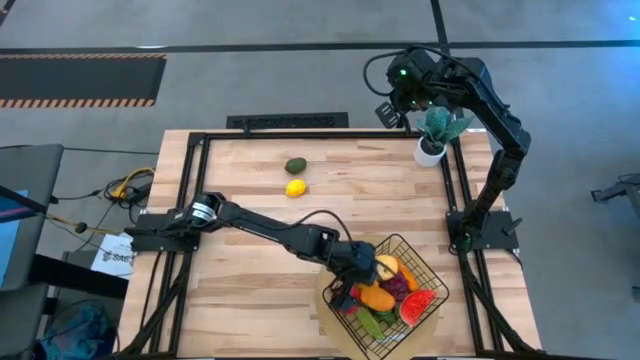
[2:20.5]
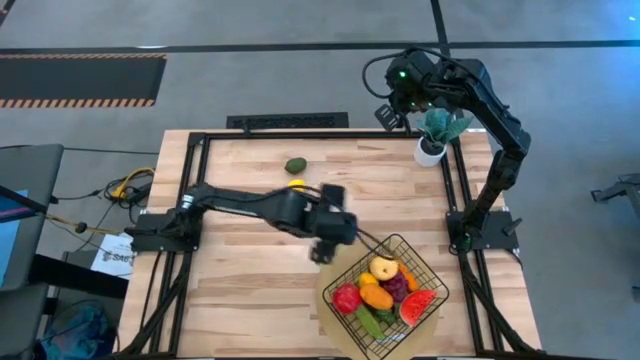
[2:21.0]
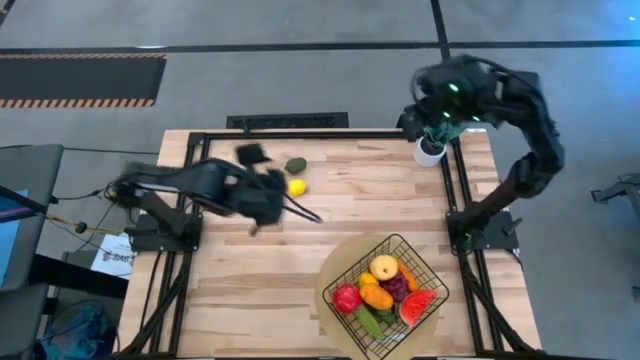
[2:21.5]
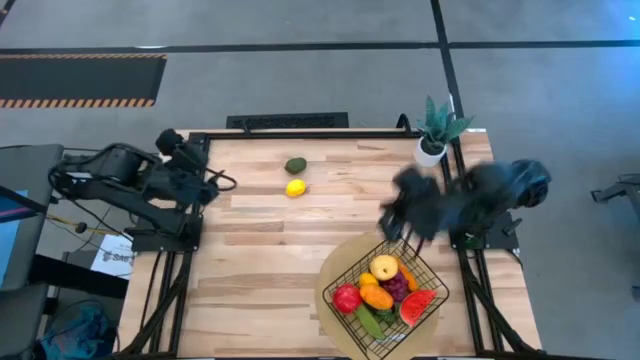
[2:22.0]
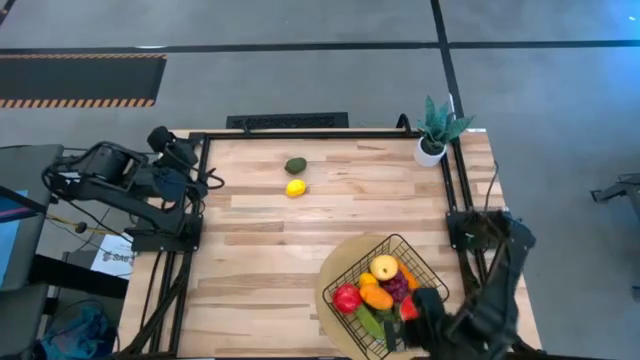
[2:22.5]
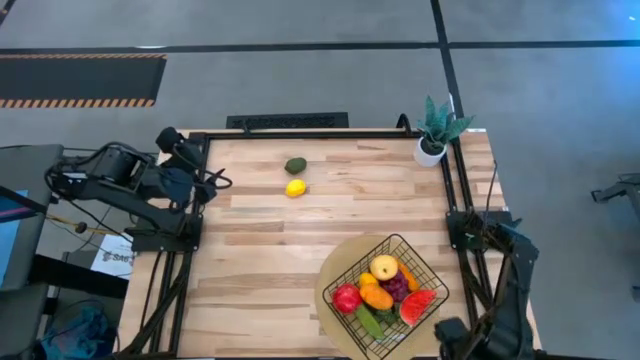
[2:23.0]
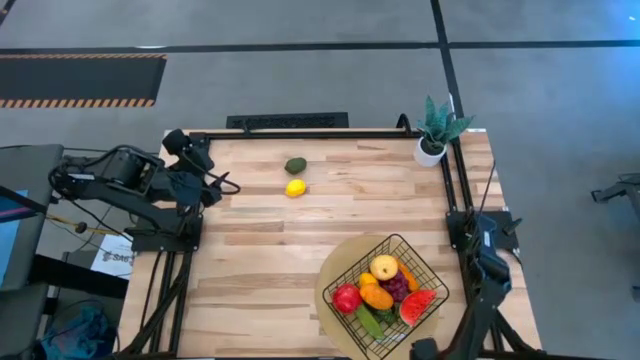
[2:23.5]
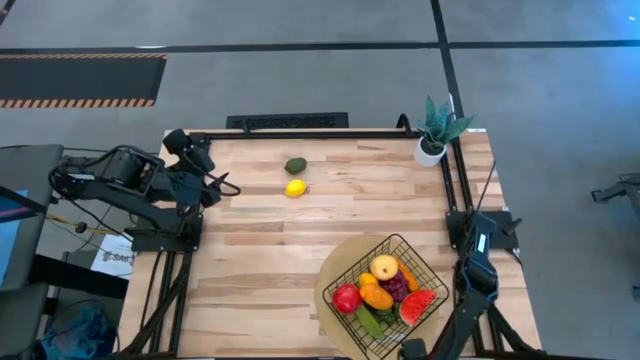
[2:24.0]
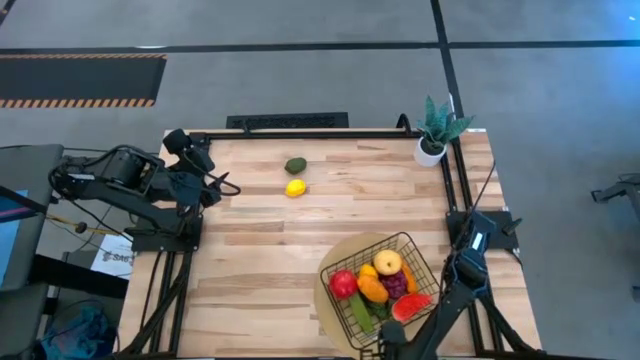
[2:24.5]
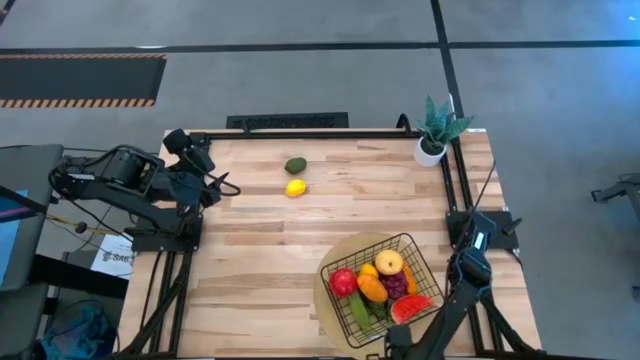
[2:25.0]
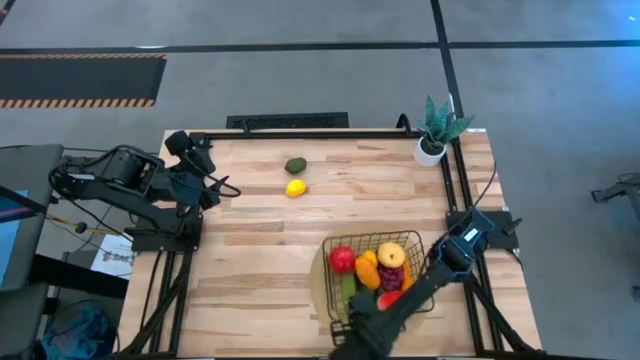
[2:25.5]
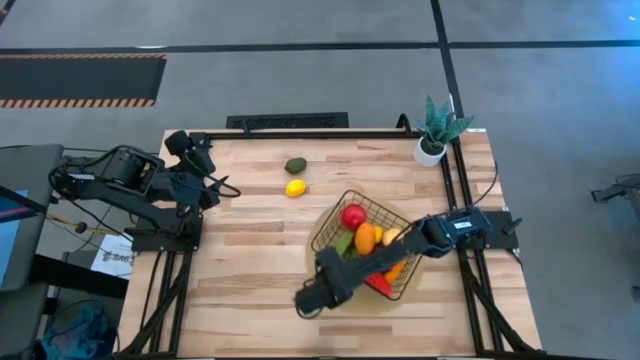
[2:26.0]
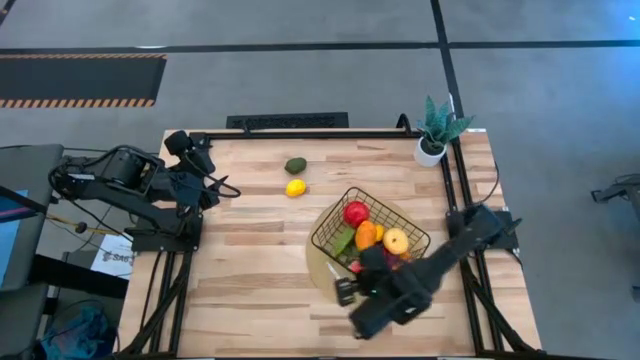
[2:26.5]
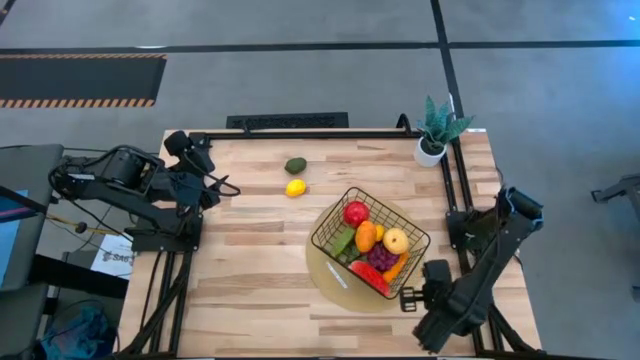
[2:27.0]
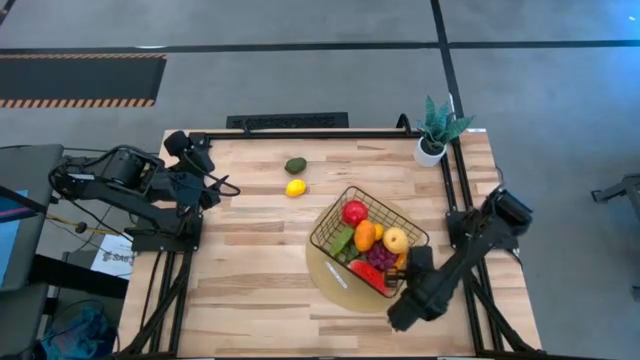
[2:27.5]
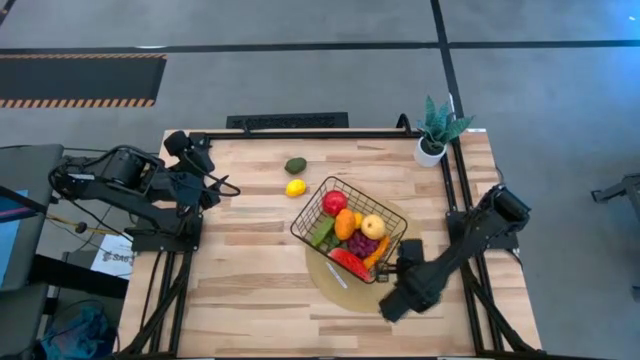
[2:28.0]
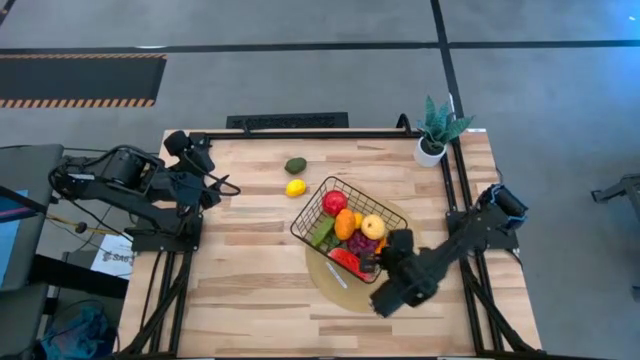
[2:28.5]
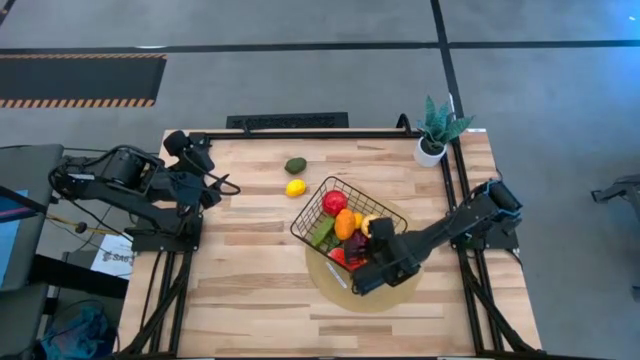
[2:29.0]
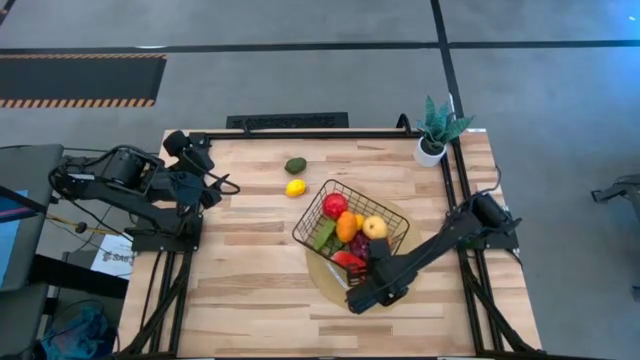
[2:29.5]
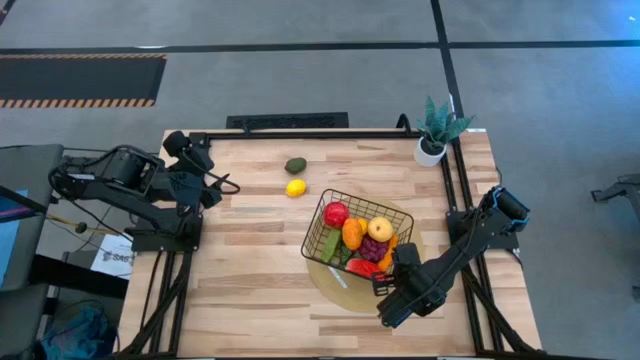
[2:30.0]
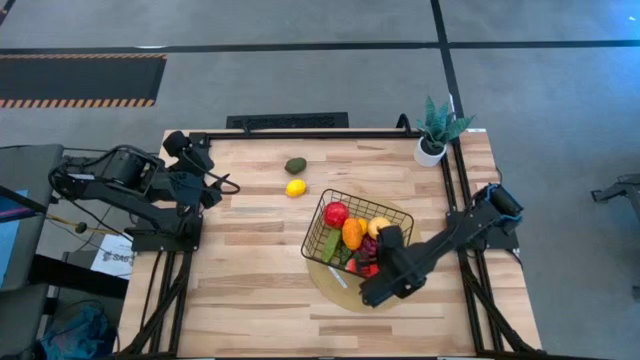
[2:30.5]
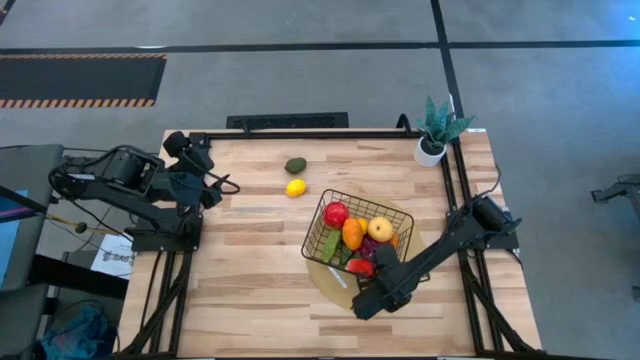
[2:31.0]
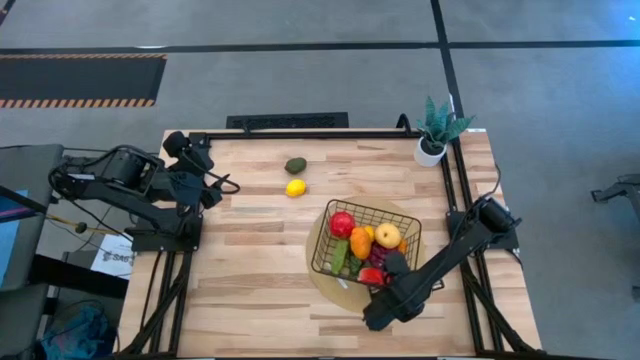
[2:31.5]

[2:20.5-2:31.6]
Task: Build produce basket
Move the mesh basket to the center of the table

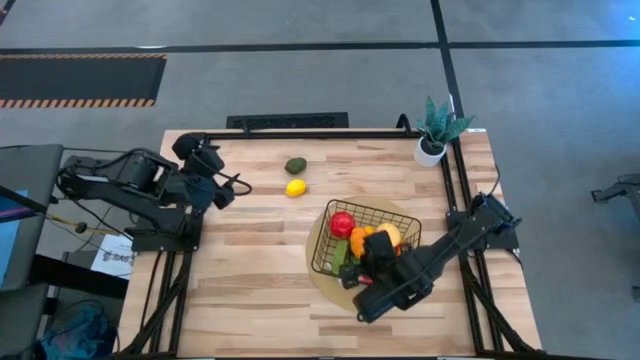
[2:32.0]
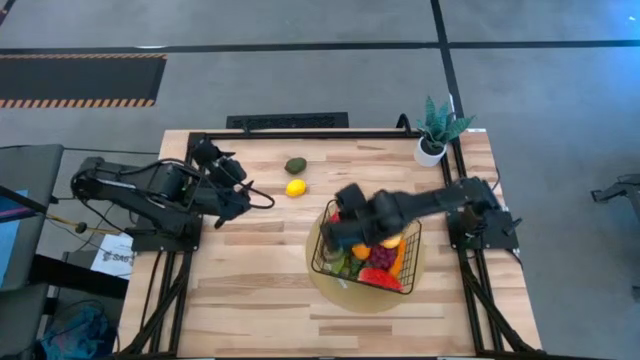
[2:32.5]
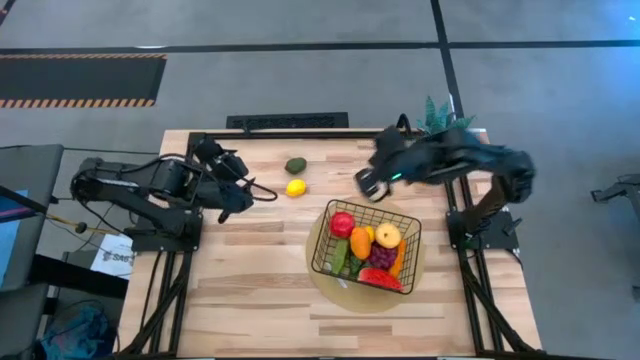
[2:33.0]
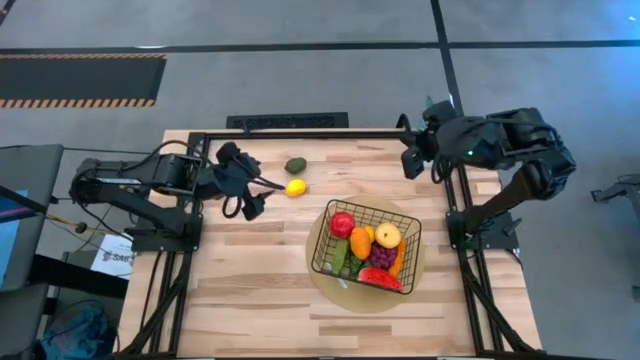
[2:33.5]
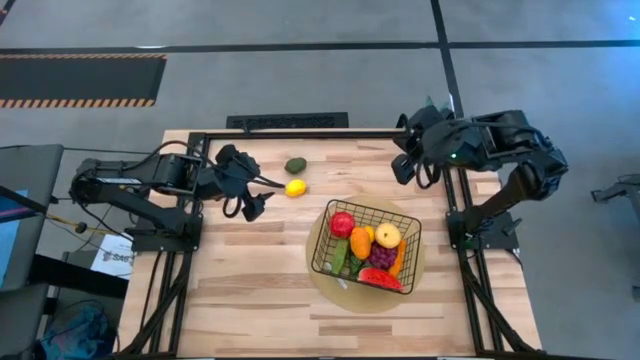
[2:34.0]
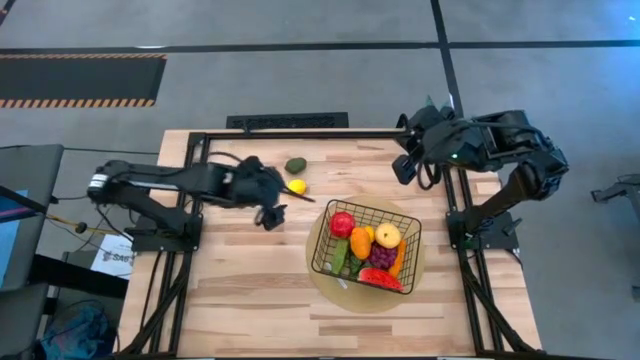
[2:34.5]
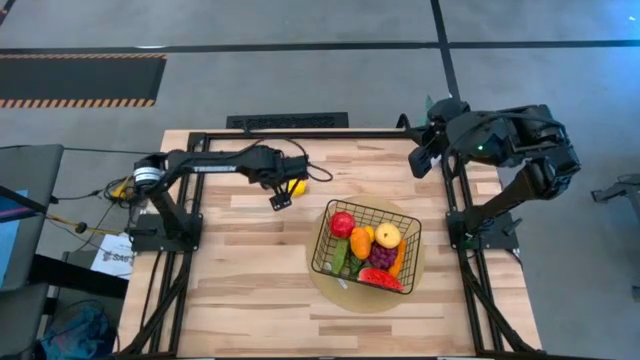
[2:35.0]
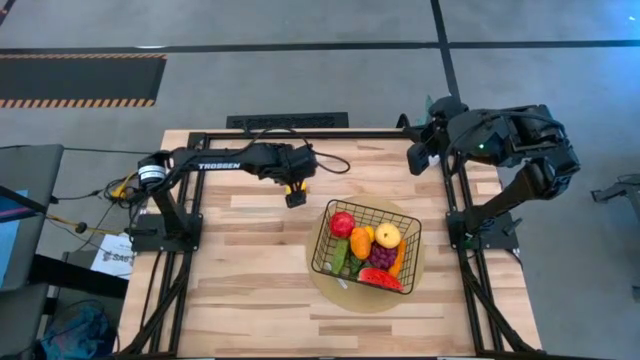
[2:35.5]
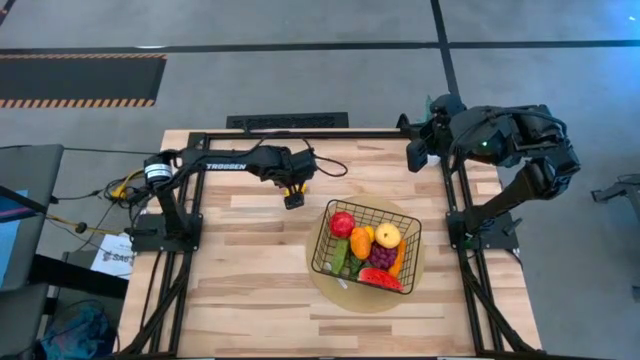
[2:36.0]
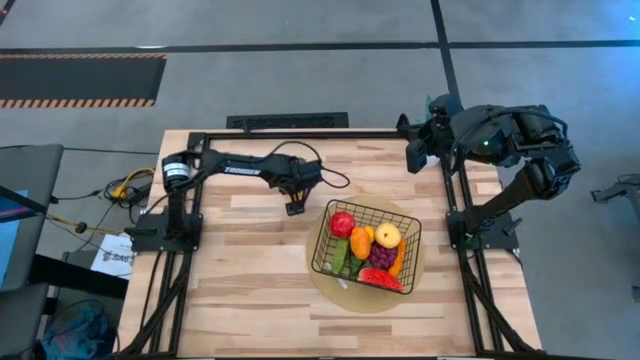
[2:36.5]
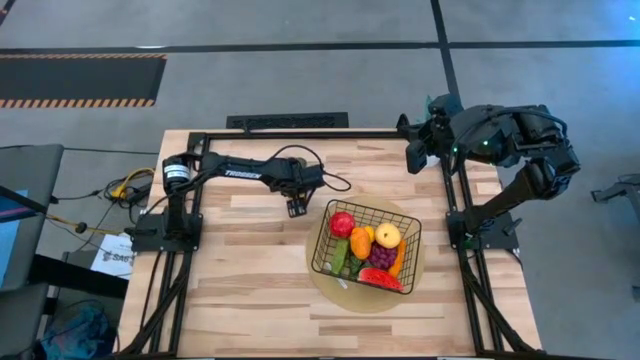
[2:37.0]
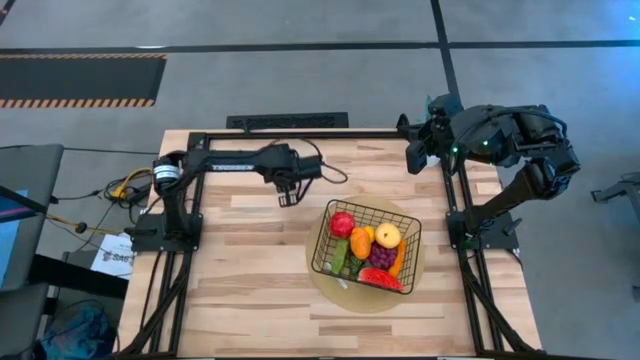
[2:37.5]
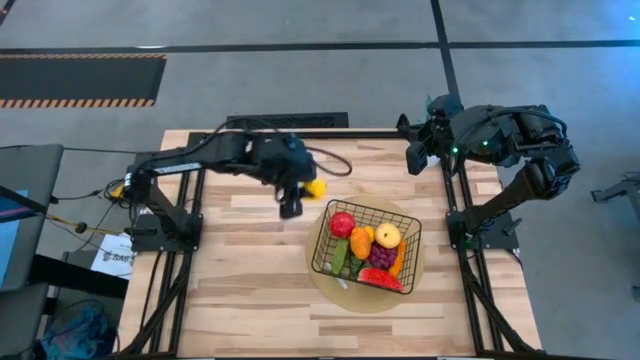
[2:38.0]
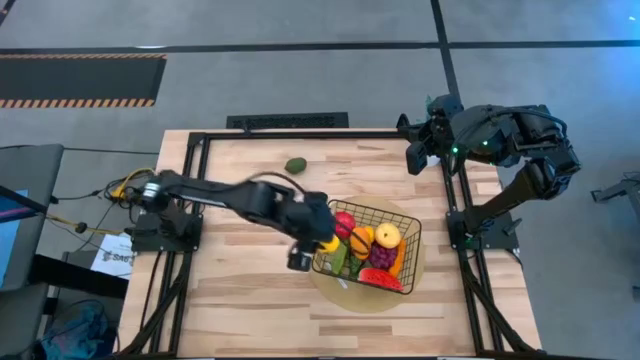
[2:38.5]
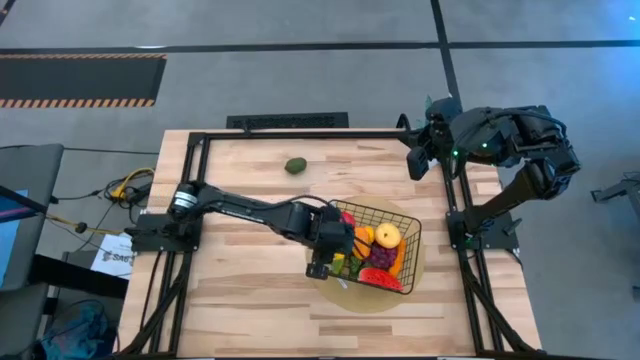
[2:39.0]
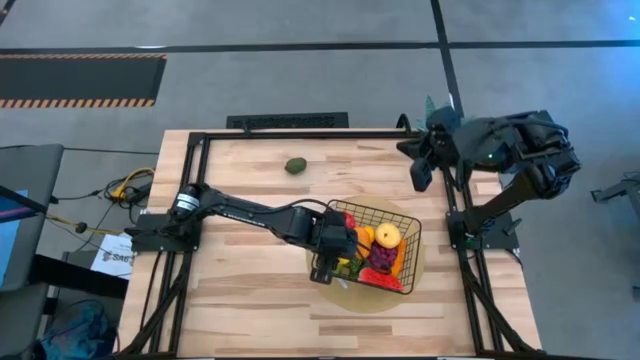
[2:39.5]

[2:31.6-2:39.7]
Put the lemon into the mesh basket
